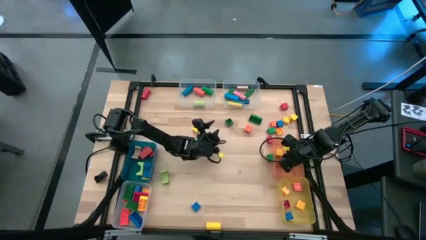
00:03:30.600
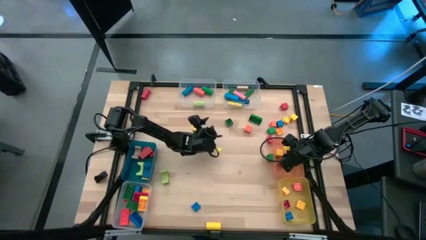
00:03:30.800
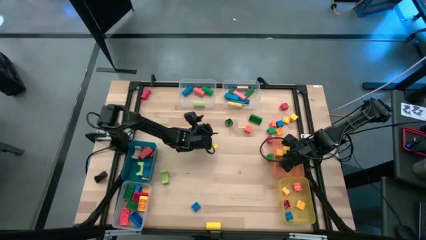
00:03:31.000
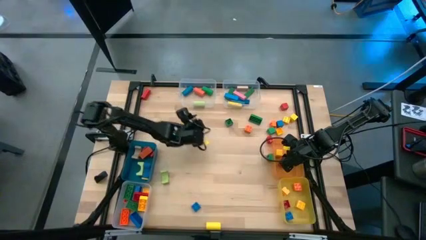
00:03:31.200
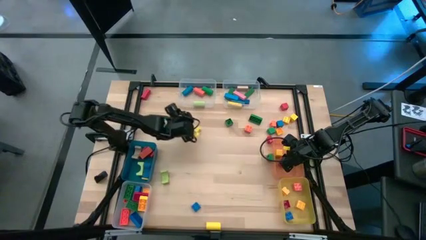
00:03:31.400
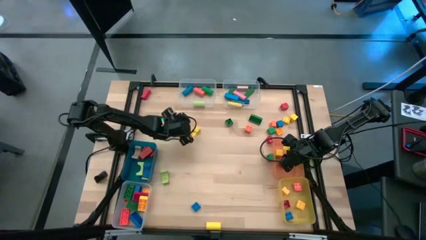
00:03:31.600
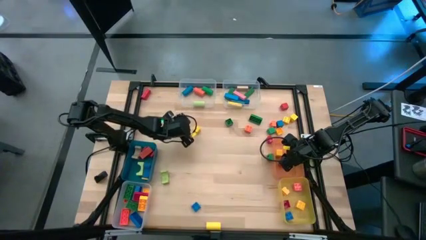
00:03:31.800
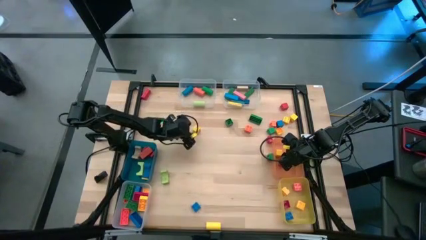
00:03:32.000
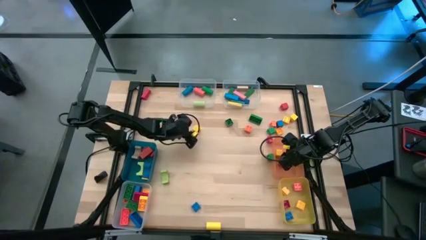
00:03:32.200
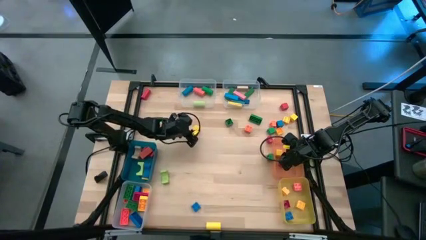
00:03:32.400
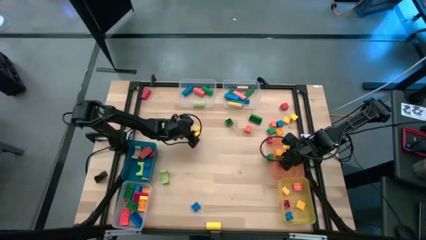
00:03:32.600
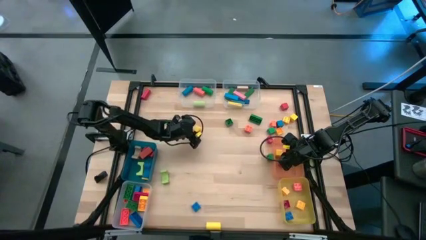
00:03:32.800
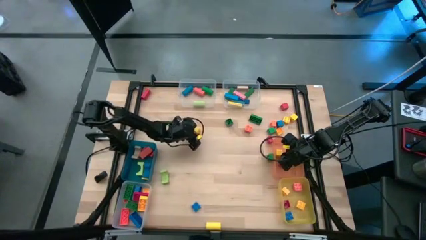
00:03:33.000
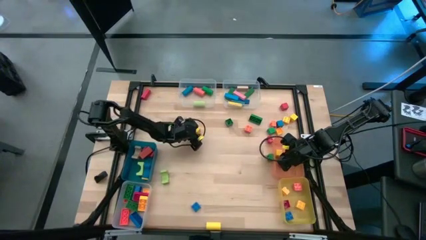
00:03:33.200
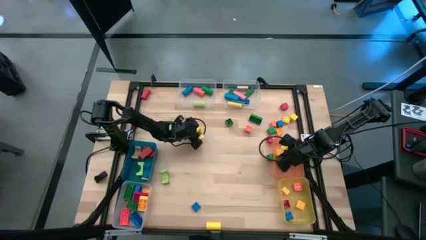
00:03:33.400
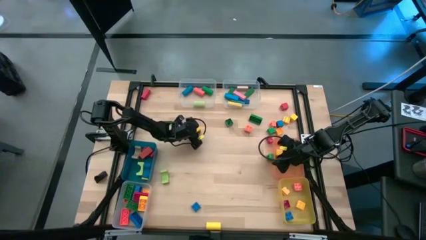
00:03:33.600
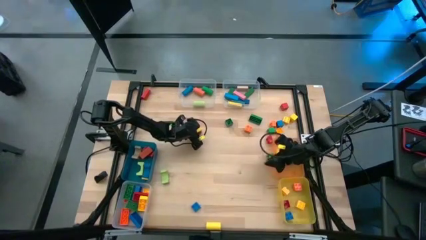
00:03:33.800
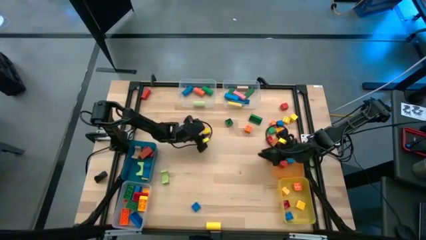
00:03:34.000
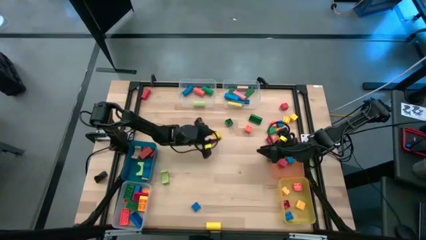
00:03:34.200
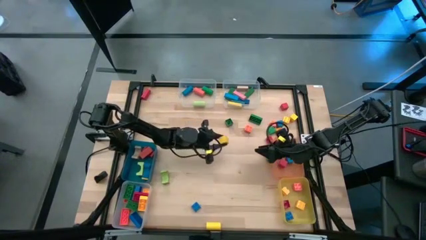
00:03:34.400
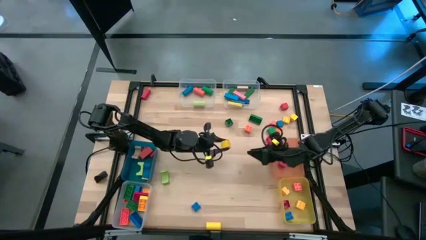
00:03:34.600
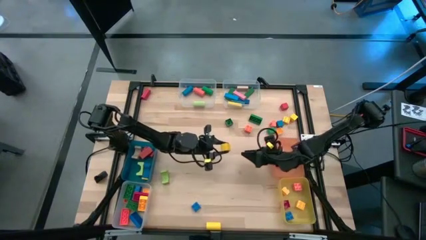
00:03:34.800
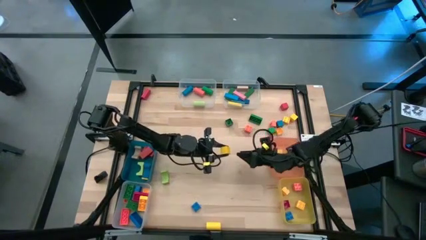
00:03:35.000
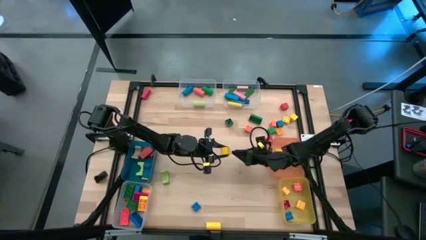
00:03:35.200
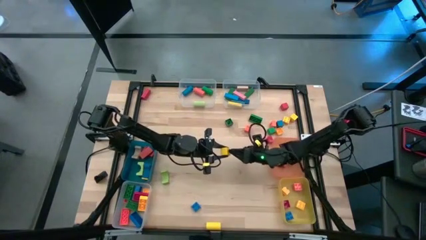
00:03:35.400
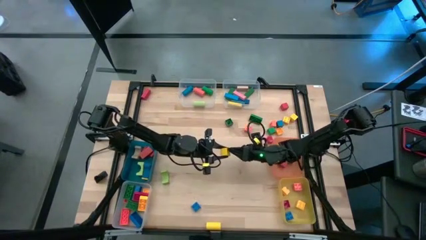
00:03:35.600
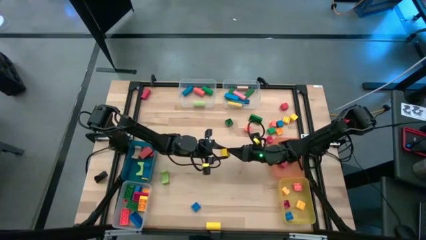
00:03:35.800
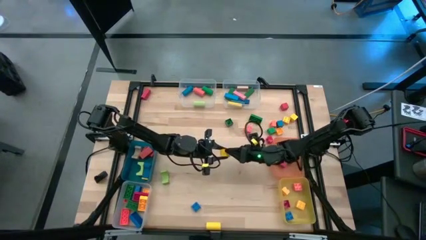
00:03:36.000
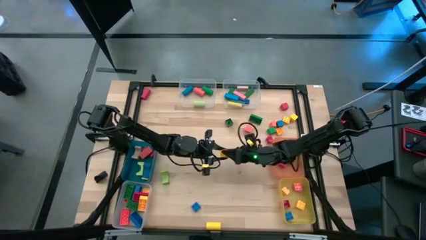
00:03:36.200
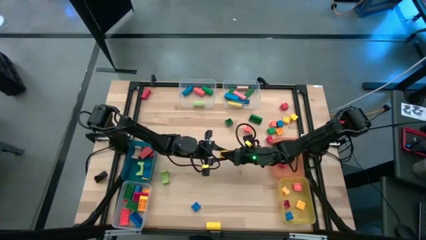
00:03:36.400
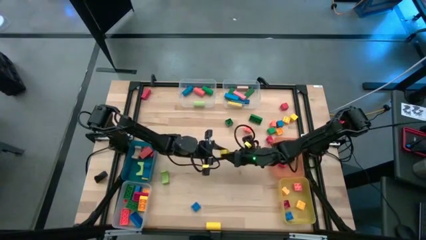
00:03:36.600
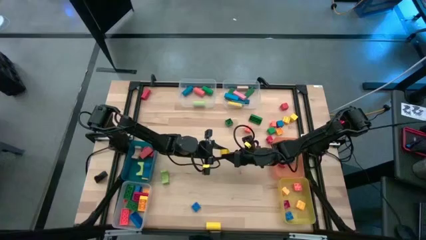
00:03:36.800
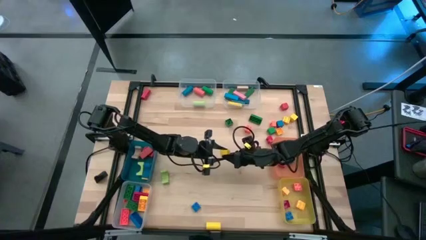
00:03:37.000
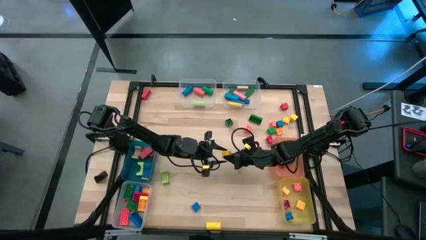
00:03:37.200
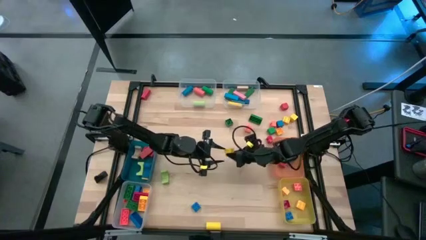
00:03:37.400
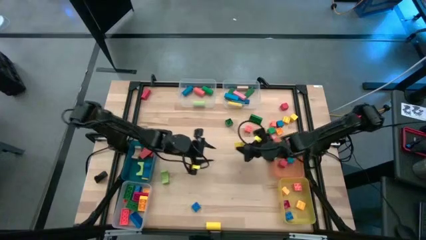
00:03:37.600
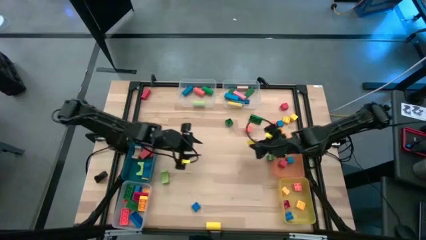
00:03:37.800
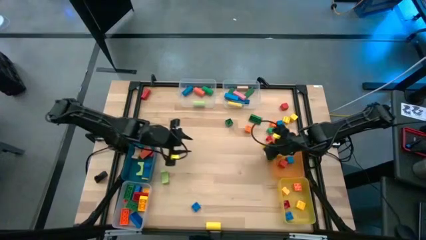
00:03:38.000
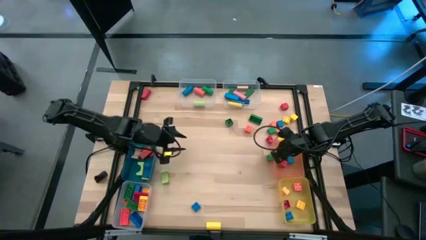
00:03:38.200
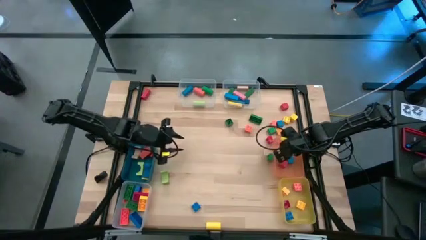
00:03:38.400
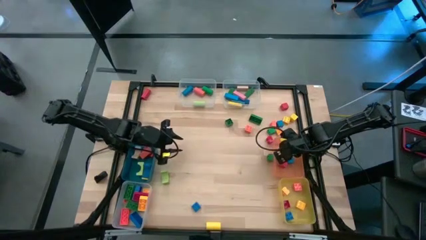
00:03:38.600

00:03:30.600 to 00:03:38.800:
Task: Sort blocks by size
Put the yellow block into the orange bin

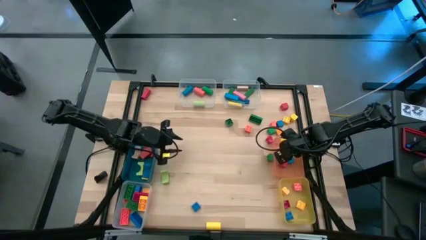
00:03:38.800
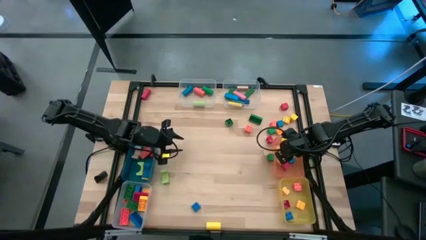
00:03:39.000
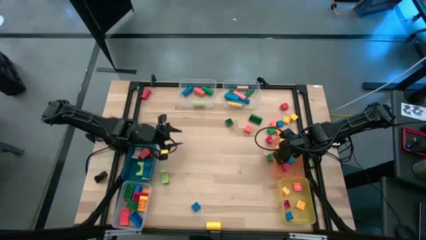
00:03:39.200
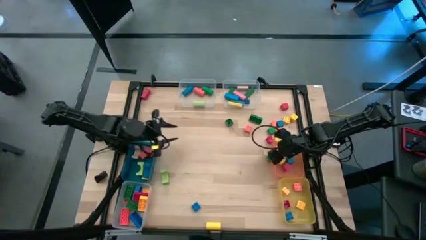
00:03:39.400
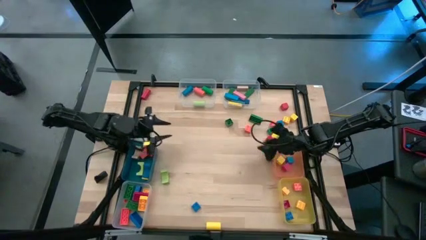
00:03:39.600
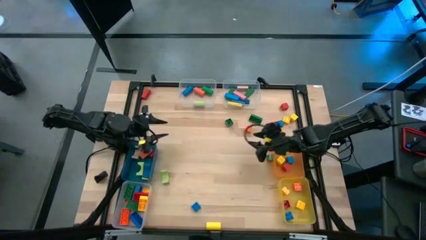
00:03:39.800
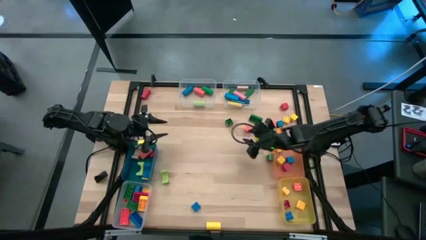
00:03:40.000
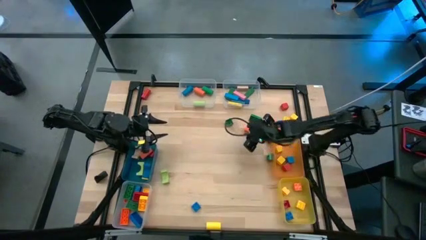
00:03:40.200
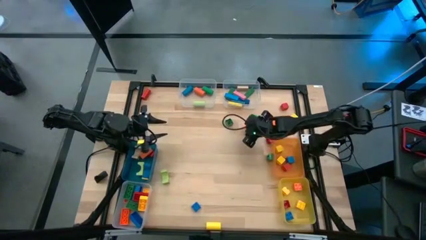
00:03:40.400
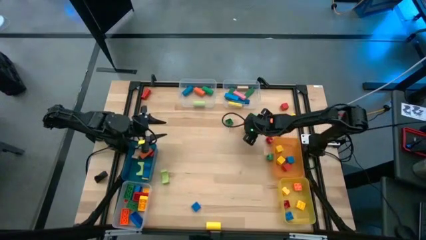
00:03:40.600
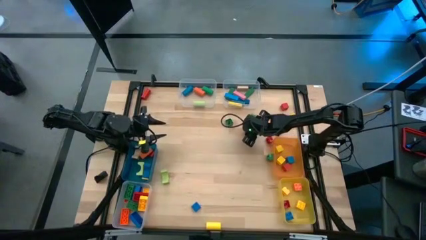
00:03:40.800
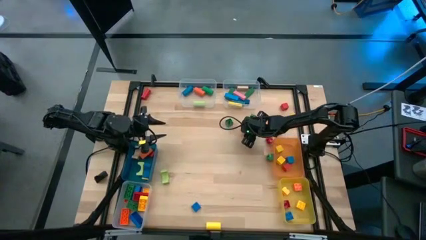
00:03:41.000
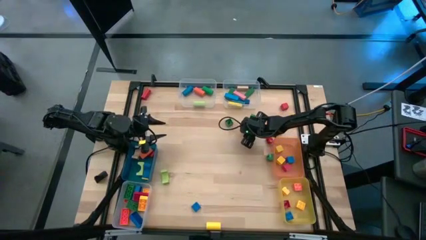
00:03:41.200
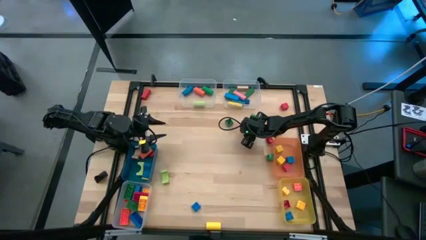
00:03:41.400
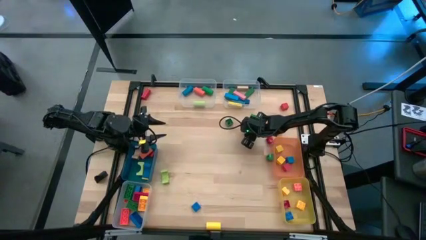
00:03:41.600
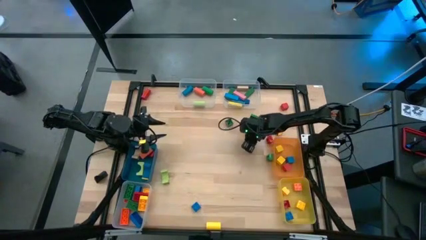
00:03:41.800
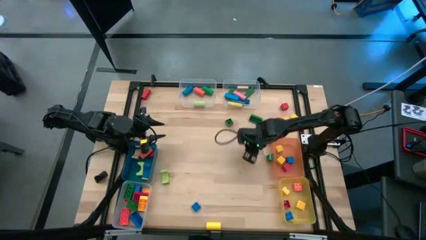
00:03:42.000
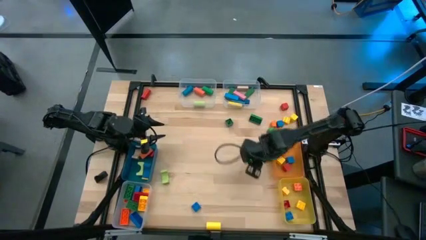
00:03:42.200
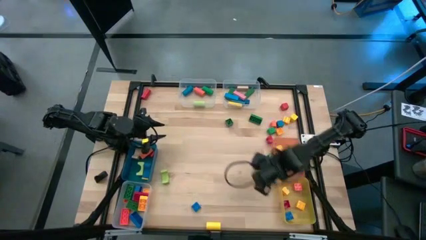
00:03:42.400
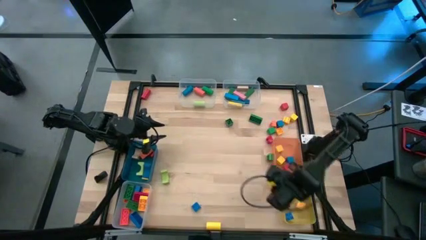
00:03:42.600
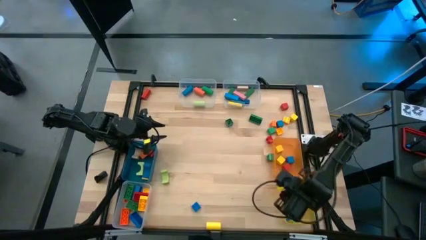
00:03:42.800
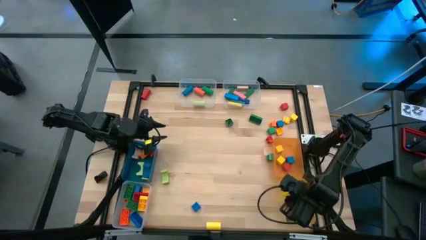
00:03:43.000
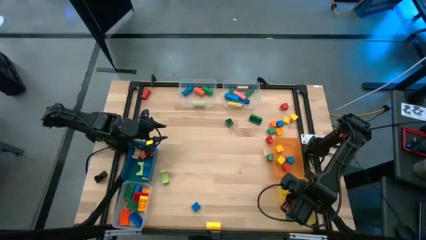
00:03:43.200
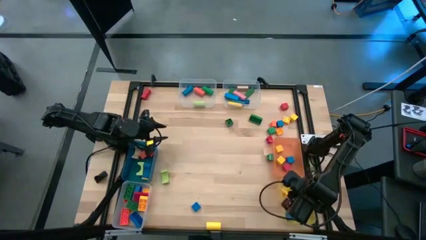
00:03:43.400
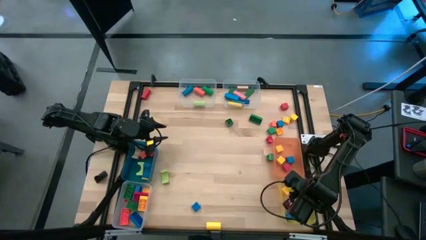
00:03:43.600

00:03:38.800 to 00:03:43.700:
Put the orange game piece into the yellow bin

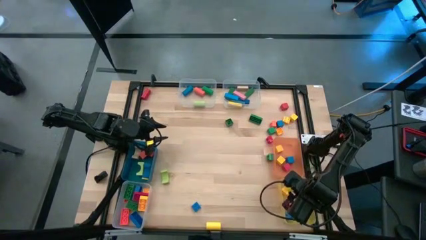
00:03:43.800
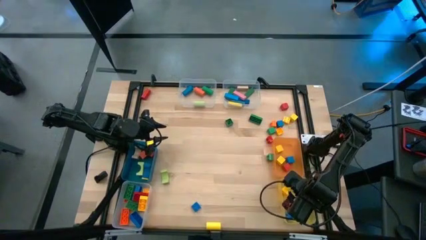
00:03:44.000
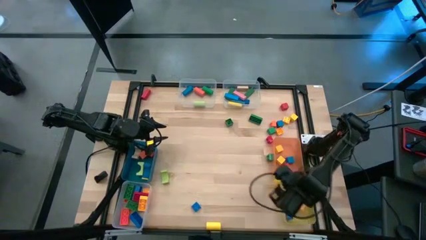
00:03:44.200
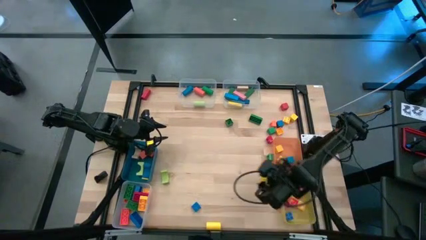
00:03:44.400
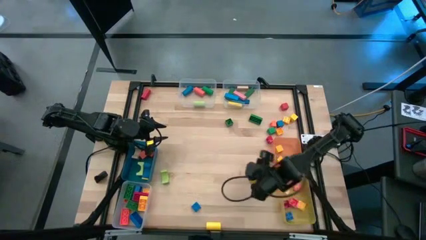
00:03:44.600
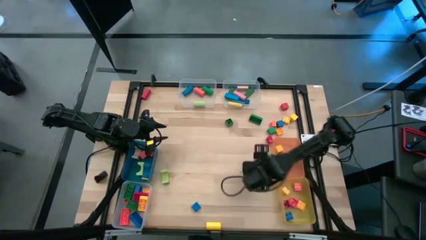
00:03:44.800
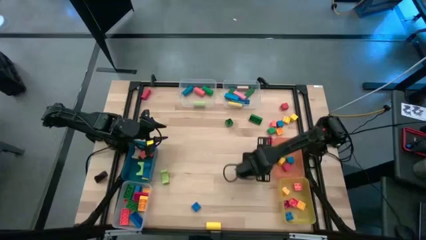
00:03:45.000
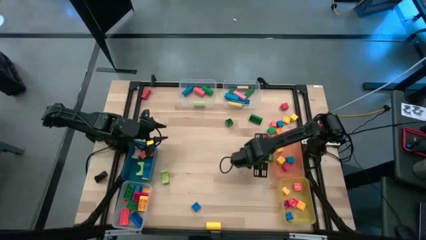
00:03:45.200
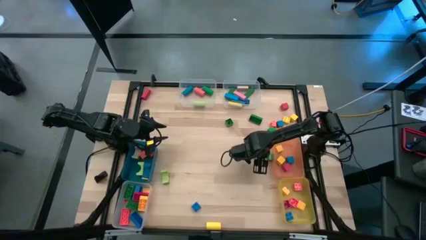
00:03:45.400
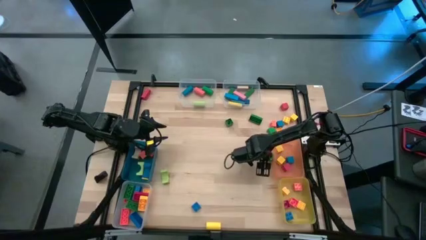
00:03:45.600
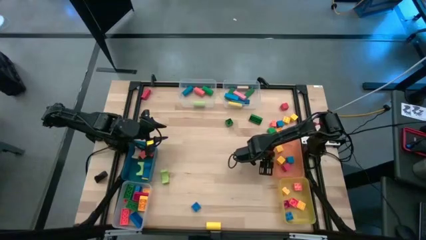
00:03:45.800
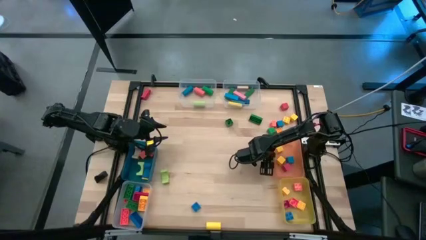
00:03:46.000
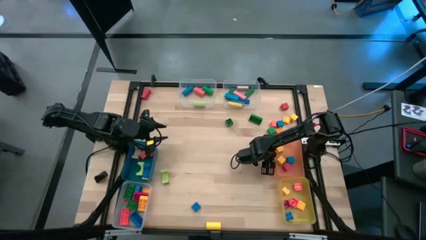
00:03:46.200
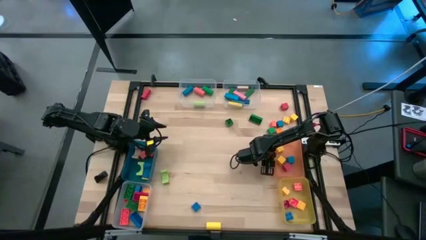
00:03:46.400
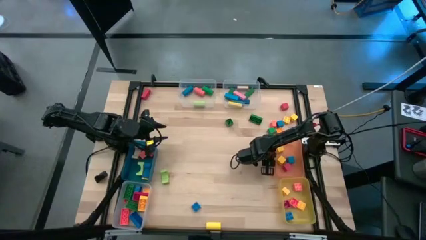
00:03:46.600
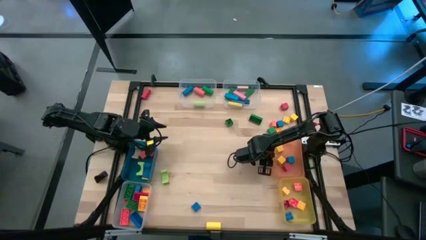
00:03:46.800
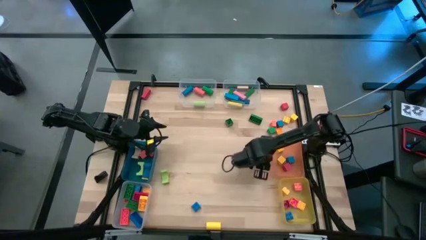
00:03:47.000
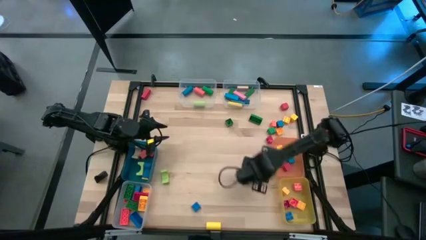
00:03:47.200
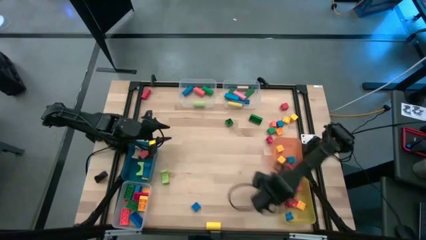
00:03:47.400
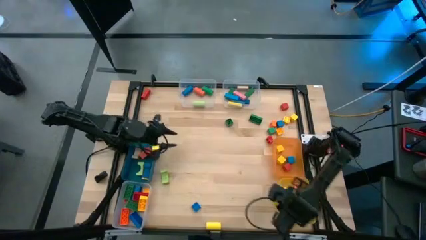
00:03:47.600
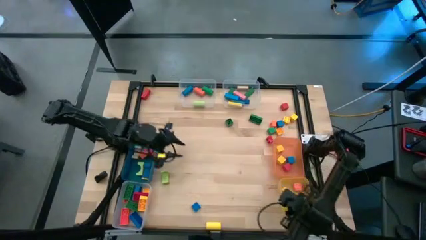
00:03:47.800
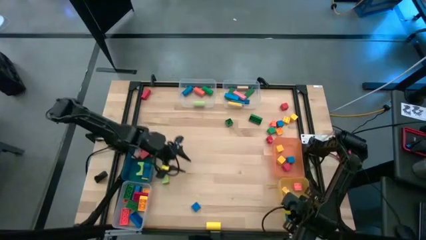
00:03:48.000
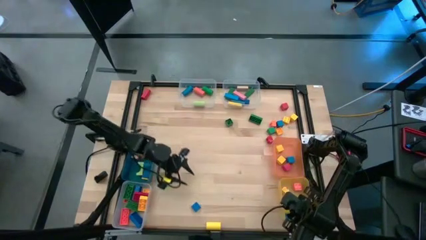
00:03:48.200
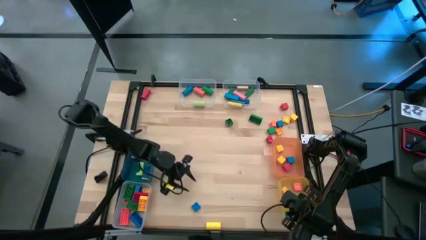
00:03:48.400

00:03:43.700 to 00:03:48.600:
Put the green game piece into the yellow bin
